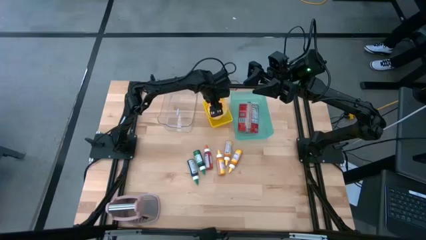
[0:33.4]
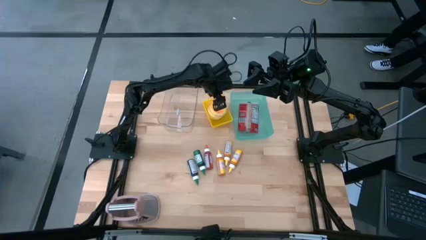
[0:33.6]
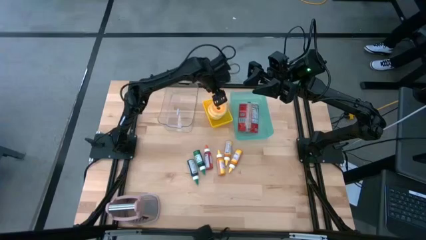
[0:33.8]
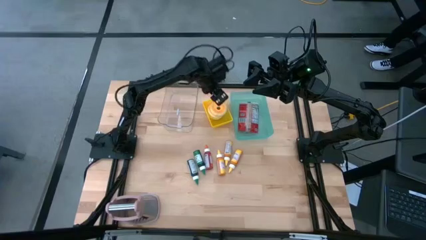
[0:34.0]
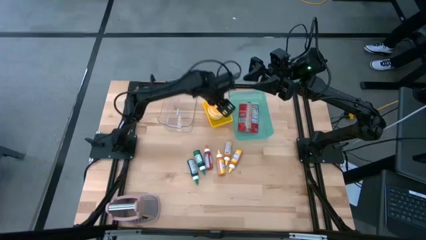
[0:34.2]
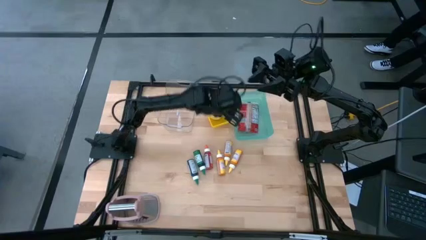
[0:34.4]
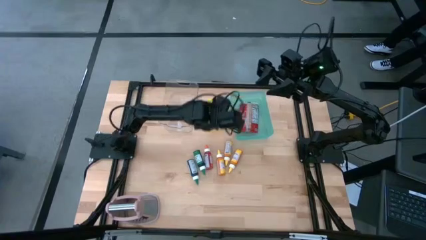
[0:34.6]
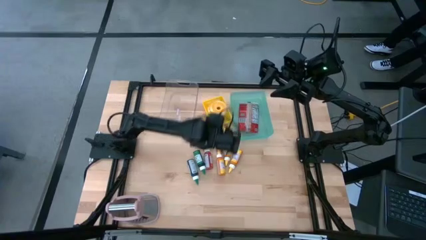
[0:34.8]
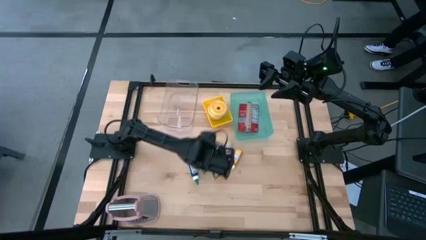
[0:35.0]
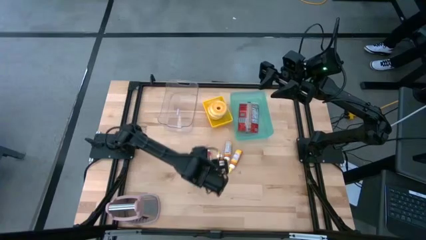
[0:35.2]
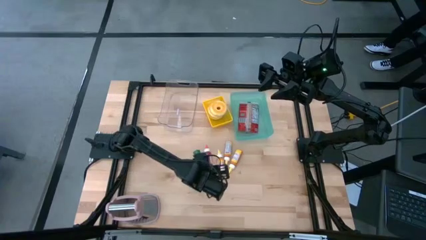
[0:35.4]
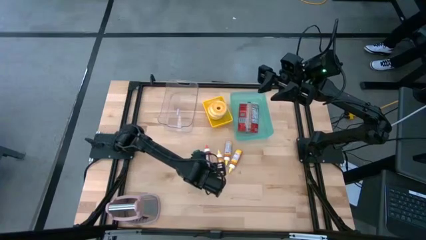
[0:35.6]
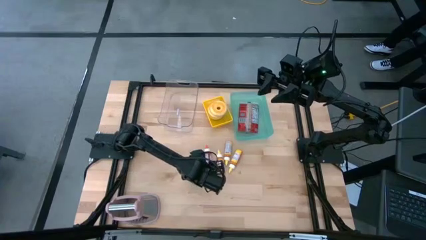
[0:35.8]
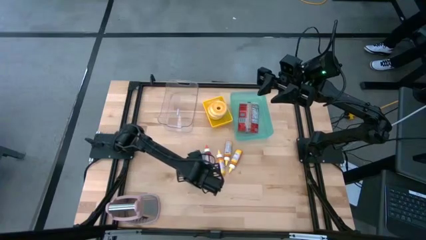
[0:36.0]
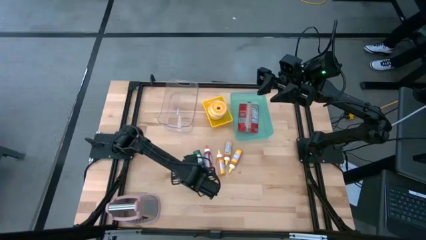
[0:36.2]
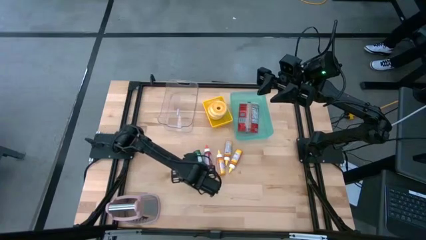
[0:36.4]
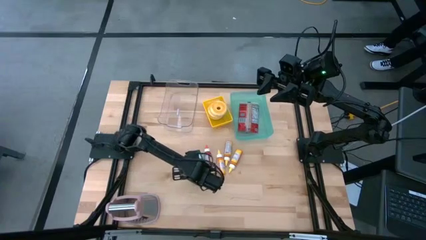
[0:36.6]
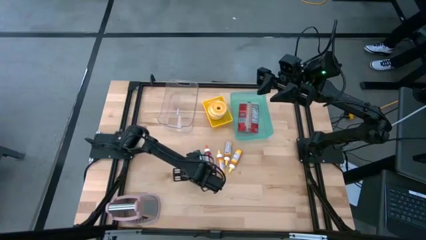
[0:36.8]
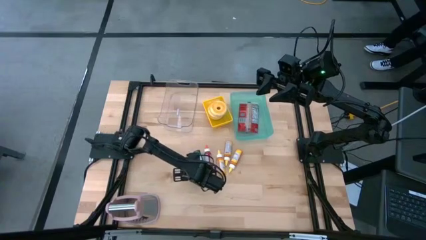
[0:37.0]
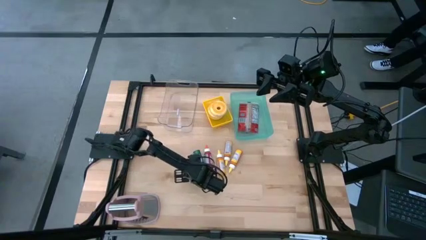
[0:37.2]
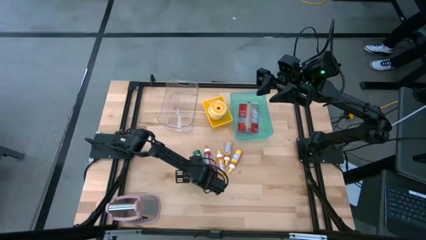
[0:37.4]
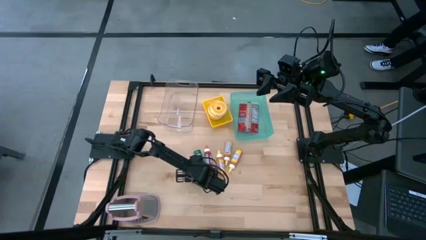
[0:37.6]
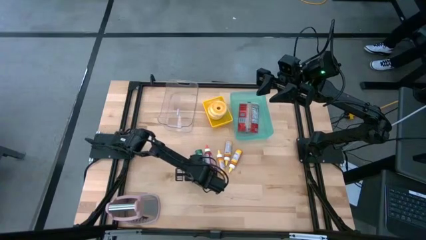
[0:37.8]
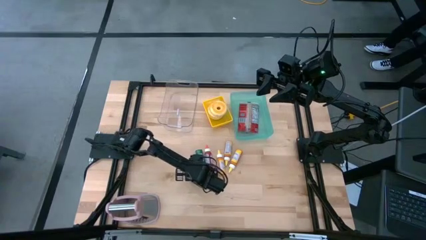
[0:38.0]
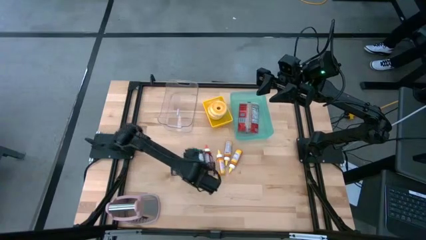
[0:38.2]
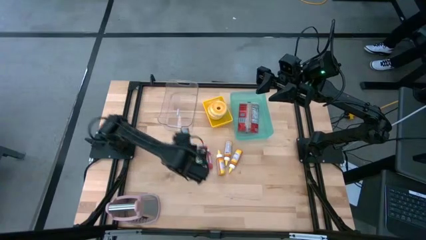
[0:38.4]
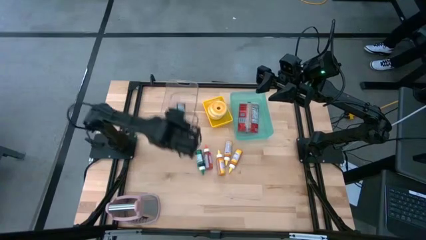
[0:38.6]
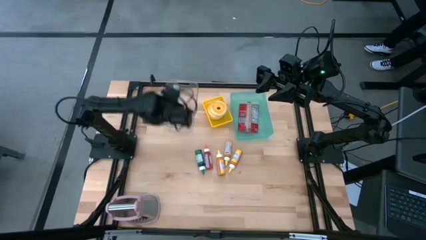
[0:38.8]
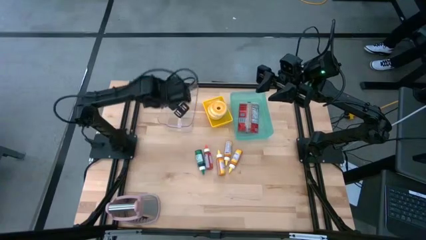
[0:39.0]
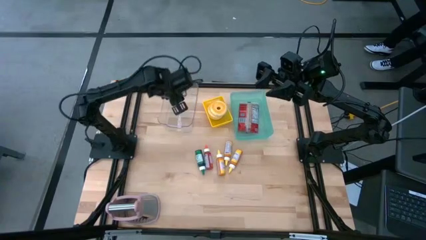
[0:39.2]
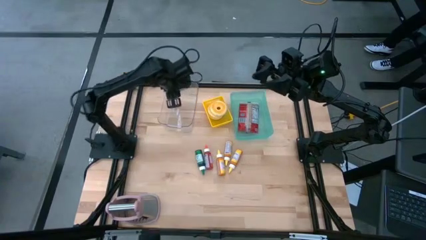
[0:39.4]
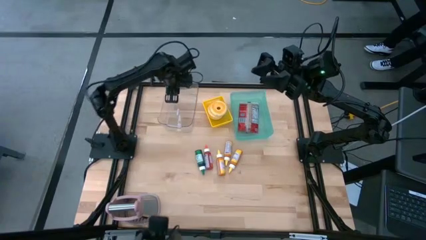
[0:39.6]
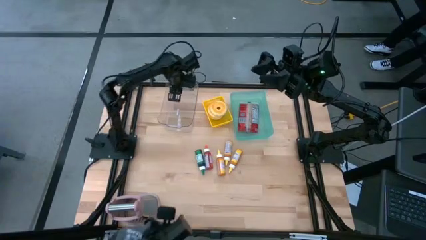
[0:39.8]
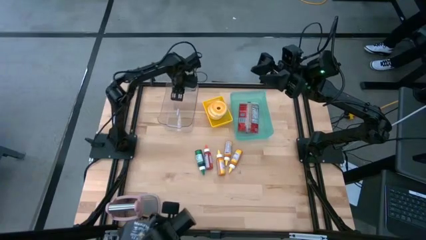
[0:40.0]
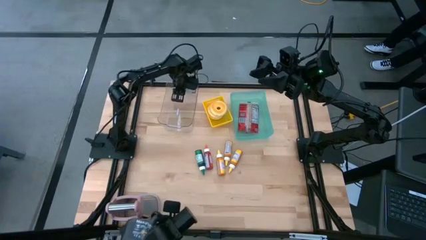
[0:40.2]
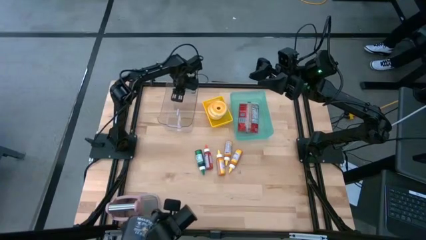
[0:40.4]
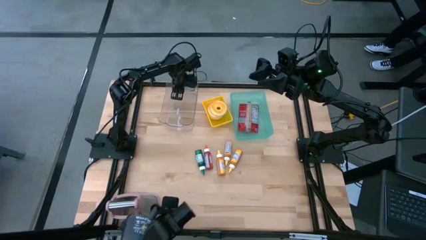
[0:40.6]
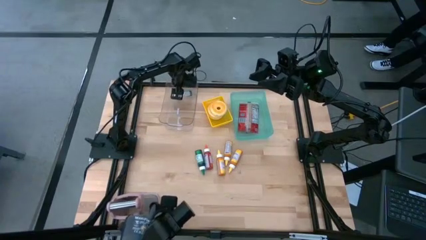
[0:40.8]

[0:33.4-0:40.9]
Put the left green food coloring bottle into the transparent bin

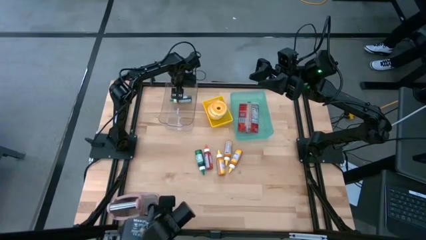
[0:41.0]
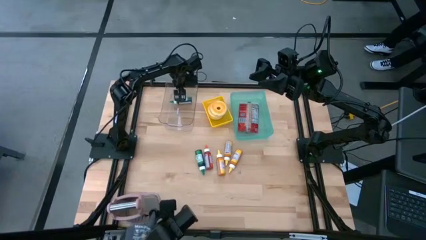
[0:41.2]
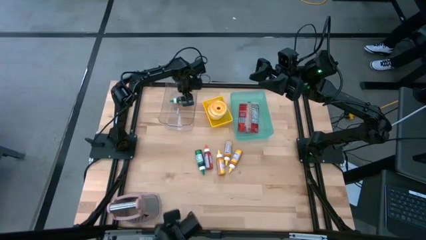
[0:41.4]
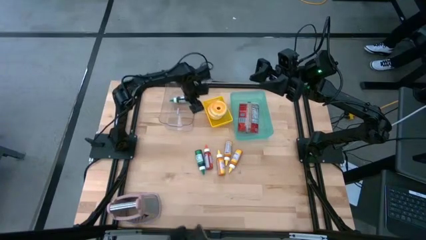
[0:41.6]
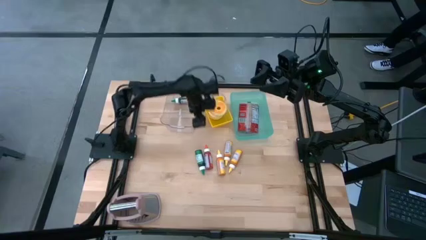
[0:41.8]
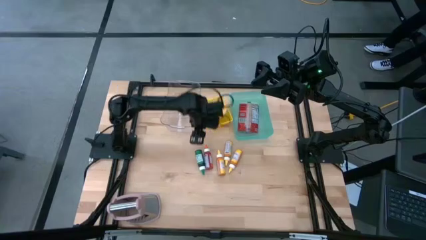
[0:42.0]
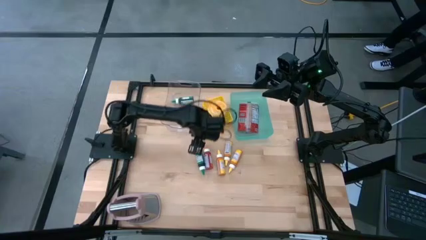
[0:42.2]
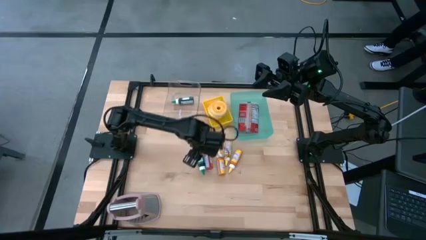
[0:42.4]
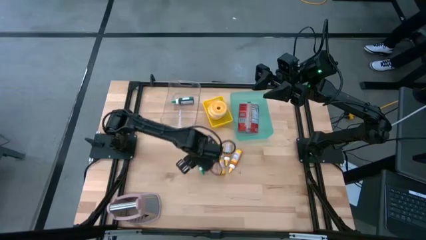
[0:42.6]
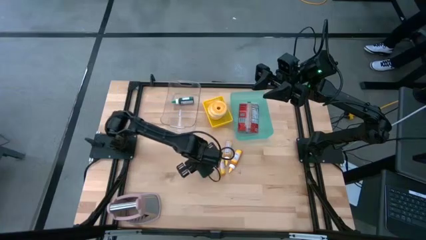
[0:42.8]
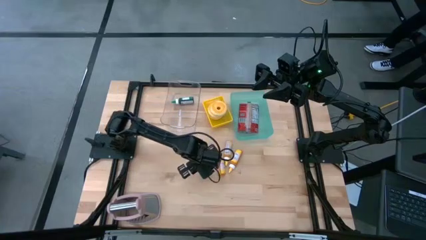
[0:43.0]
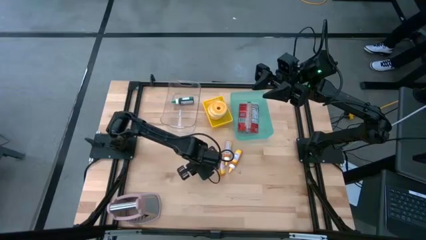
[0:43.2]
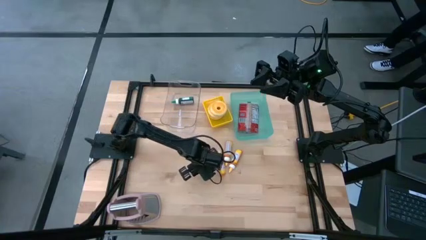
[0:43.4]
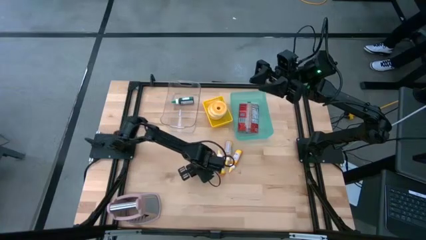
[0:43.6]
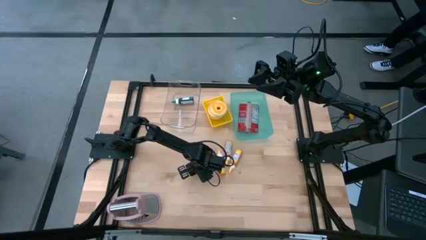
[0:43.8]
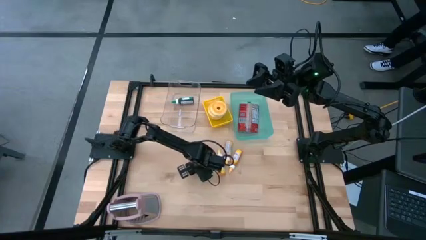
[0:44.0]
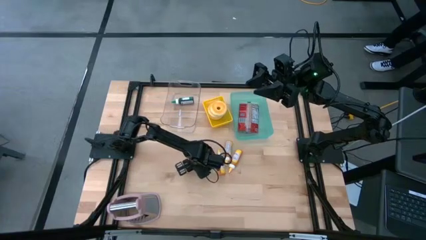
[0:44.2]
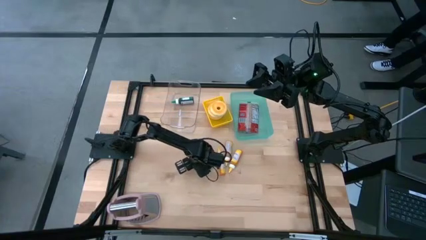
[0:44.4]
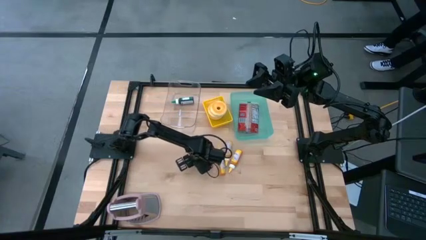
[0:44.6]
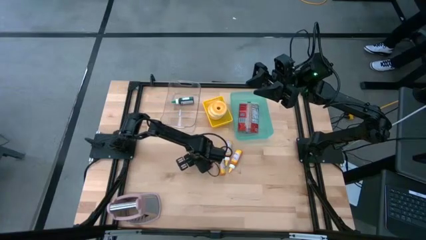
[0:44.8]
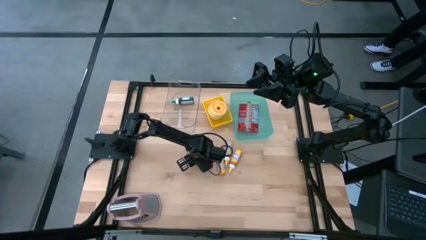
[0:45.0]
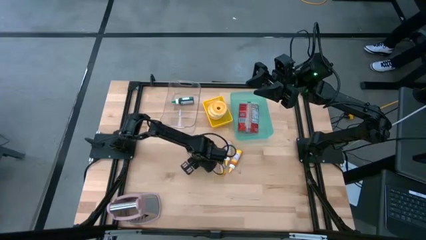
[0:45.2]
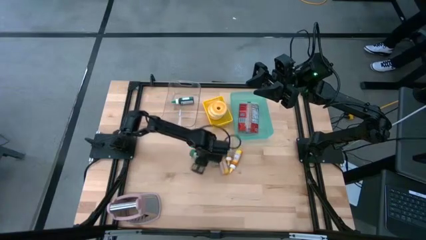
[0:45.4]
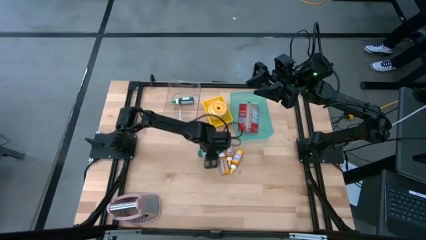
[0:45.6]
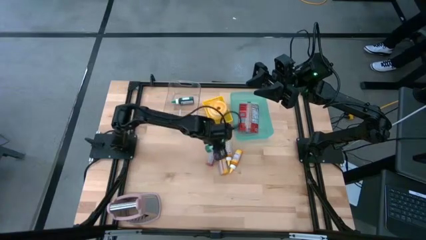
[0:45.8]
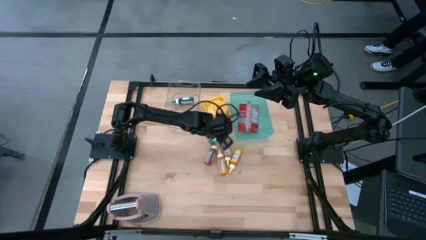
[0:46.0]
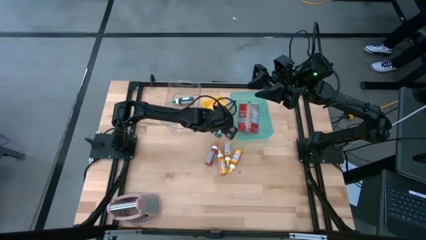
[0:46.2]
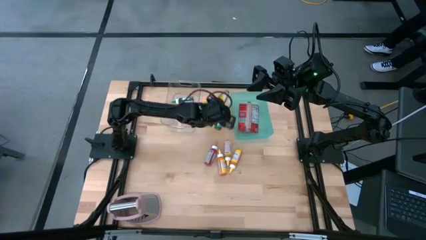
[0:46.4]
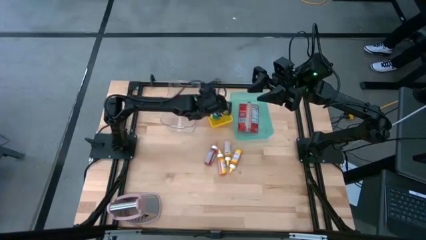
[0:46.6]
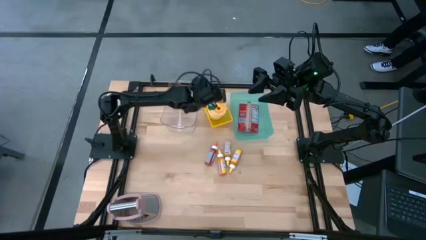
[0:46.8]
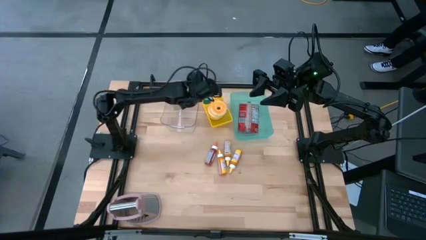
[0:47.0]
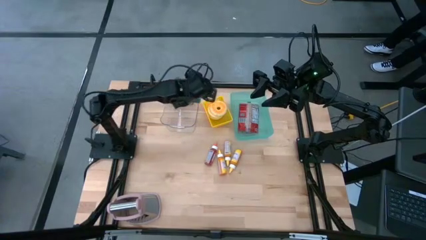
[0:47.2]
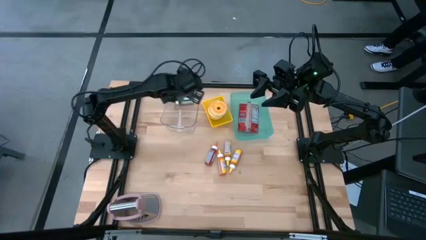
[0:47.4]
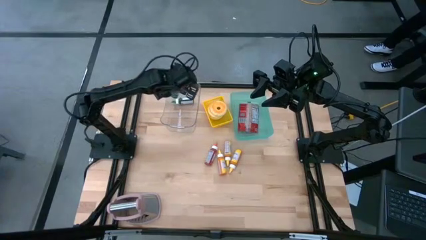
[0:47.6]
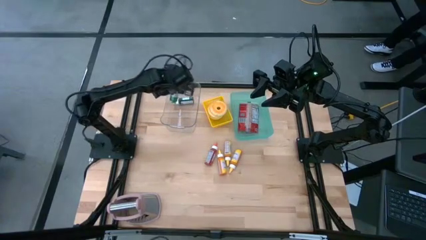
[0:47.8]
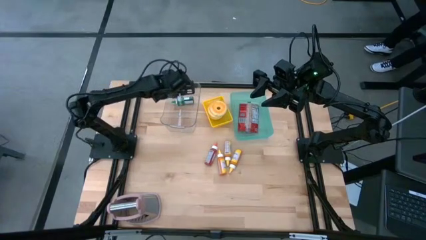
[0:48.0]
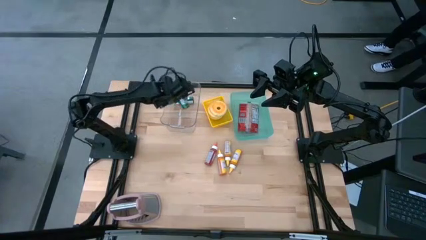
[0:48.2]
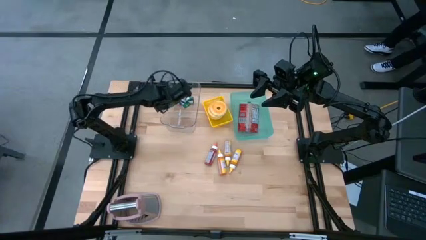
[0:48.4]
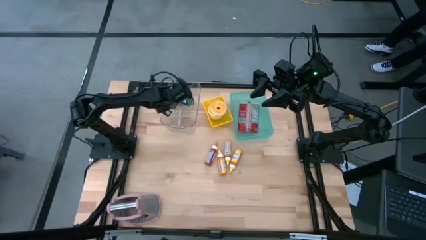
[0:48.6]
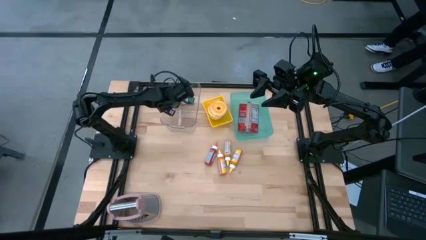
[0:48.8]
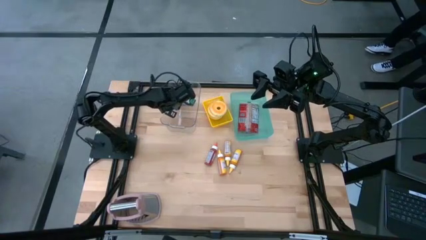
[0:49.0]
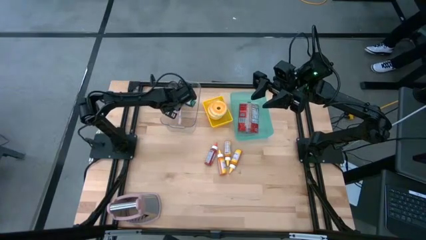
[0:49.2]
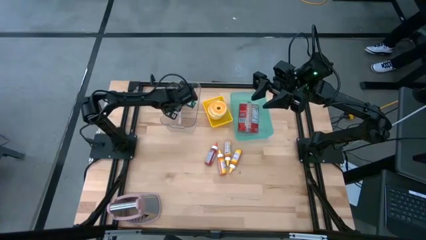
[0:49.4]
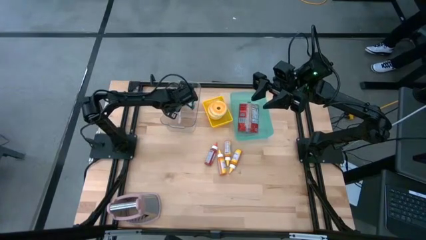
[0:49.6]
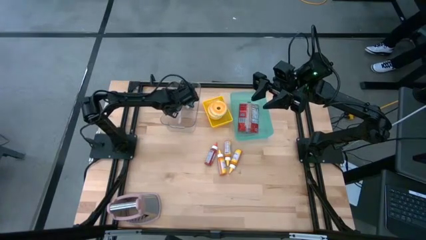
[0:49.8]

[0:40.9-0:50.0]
Put the green food coloring bottle into the transparent bin
